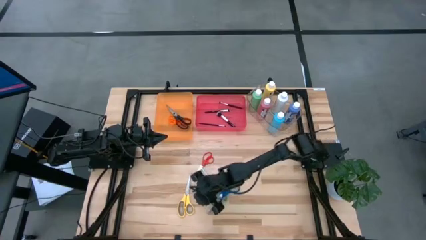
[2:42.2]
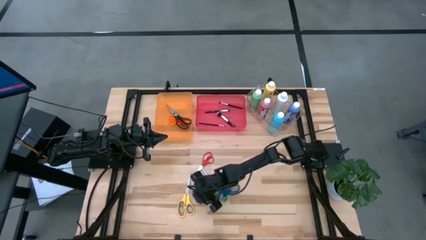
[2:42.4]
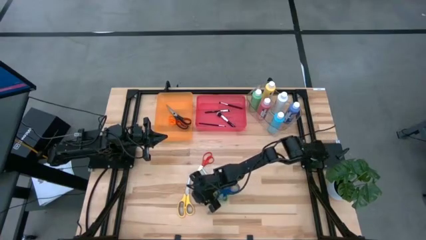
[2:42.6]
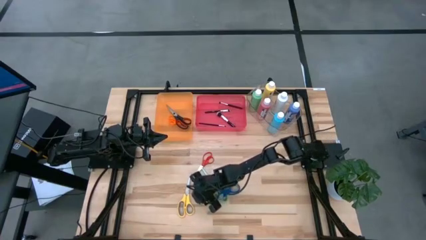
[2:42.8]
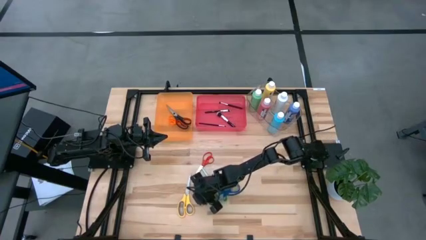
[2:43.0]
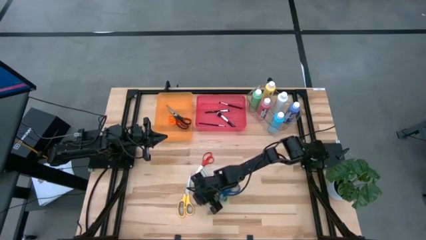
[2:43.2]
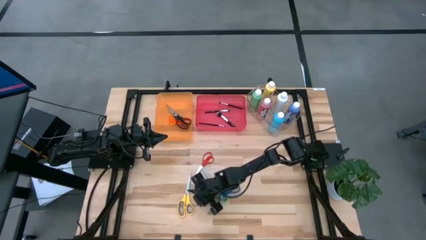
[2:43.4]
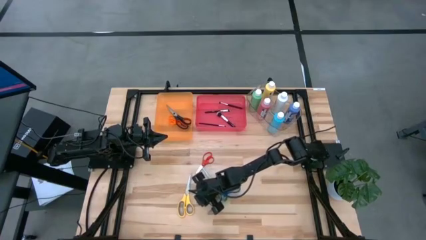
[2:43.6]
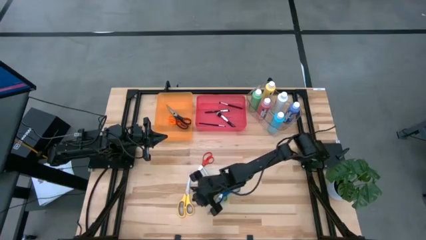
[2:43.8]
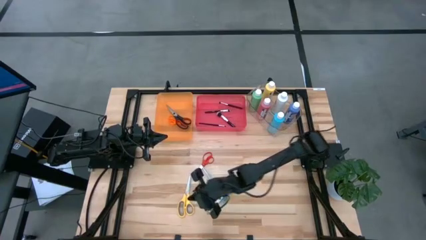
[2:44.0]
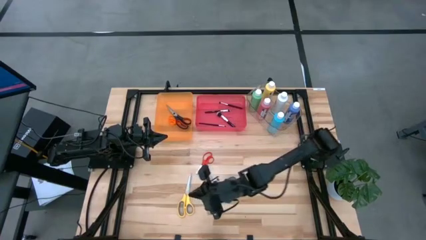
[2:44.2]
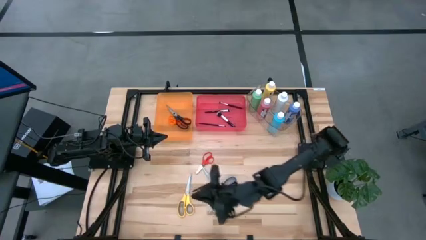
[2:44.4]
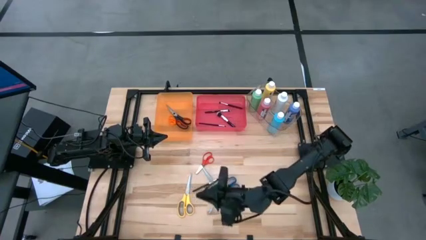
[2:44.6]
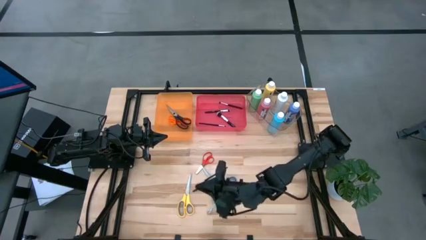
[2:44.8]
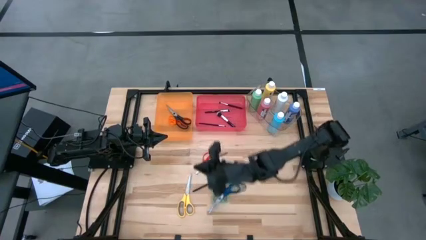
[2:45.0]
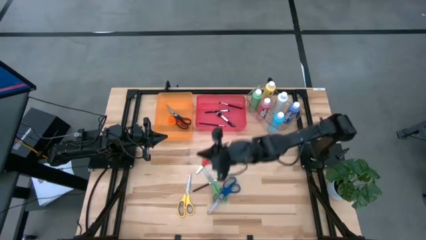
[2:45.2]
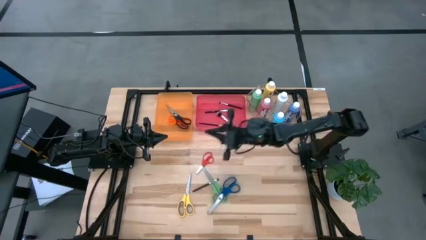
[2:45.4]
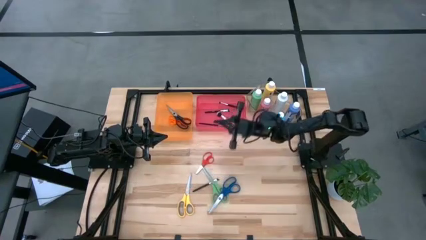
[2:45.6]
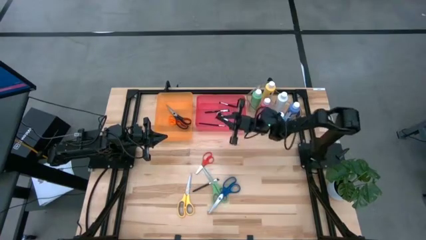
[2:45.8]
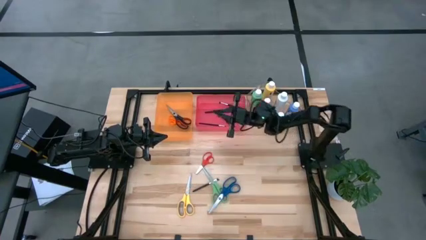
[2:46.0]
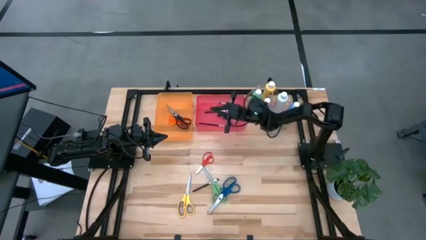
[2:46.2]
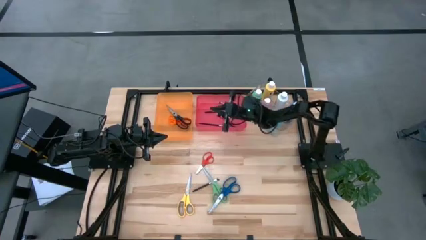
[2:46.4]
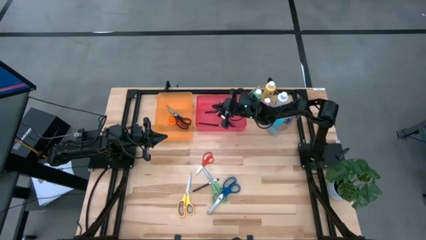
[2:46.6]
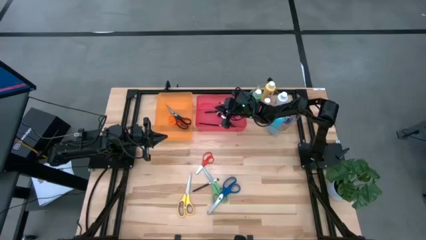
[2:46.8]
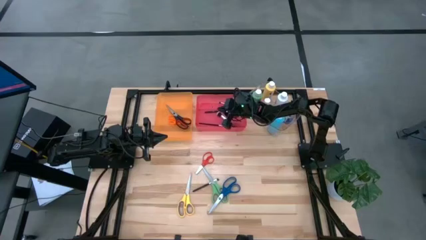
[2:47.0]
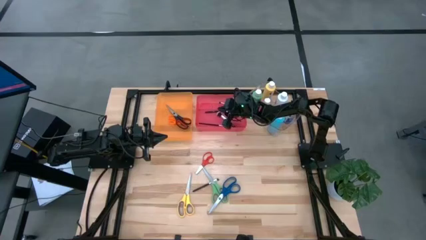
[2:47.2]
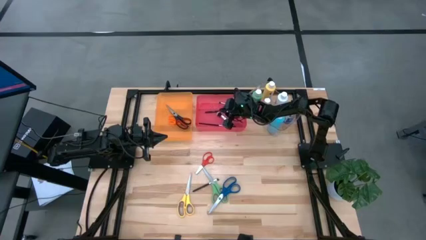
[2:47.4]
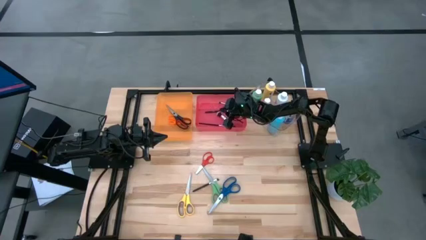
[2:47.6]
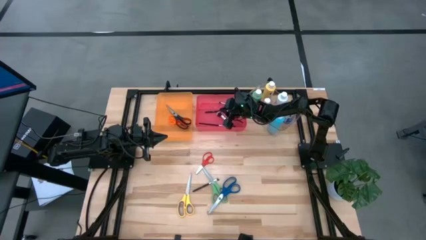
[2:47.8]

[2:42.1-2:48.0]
Task: Pick & Place Paint Supplies
Put the black paintbrush into the pink bin

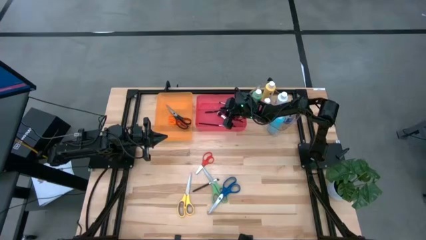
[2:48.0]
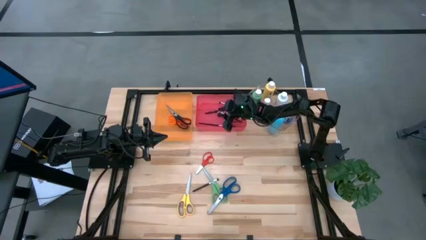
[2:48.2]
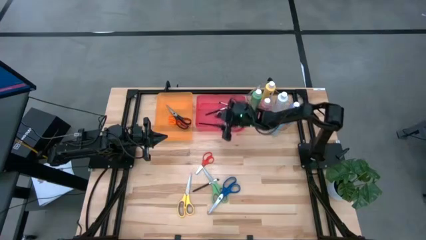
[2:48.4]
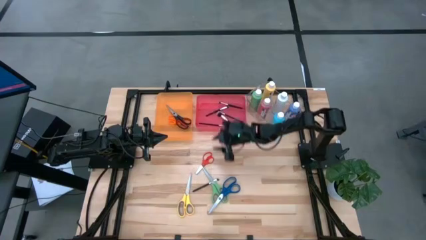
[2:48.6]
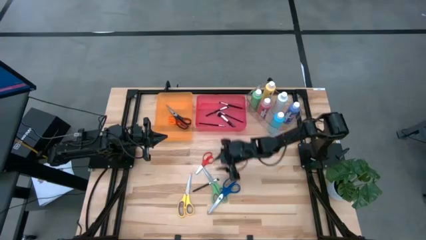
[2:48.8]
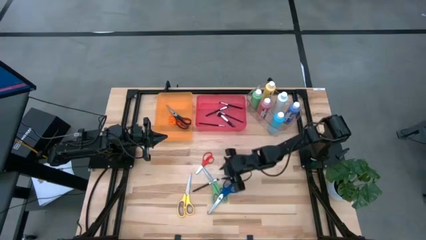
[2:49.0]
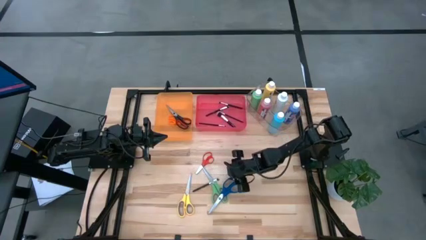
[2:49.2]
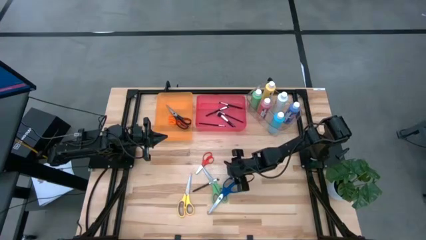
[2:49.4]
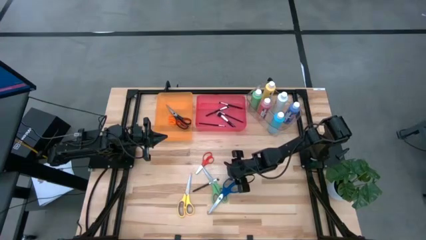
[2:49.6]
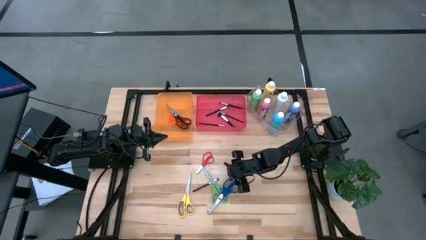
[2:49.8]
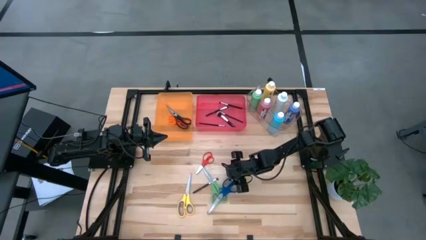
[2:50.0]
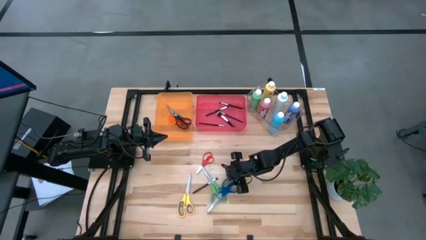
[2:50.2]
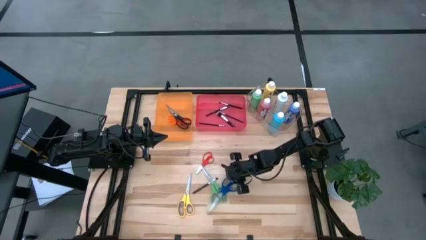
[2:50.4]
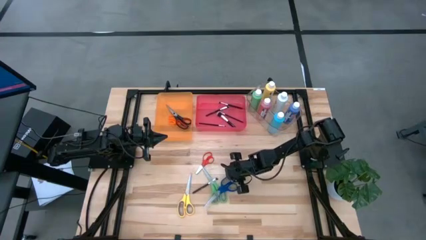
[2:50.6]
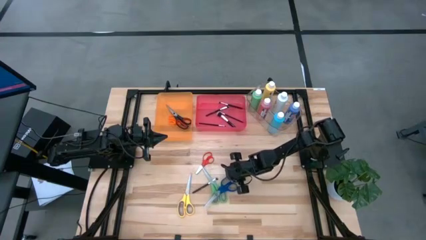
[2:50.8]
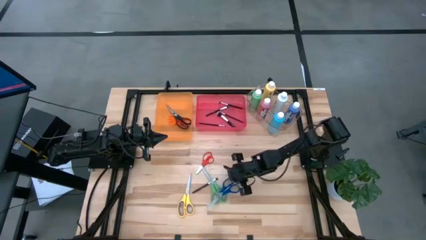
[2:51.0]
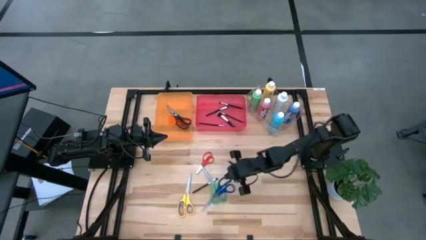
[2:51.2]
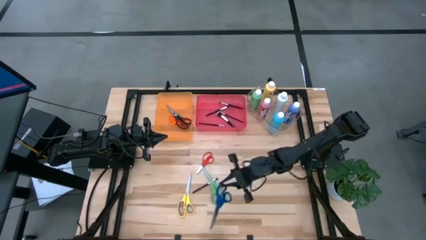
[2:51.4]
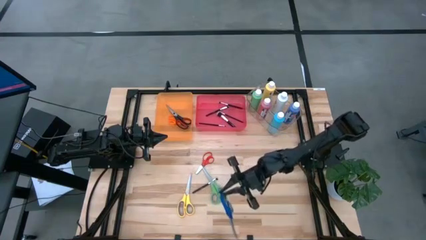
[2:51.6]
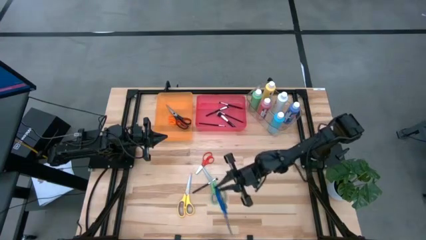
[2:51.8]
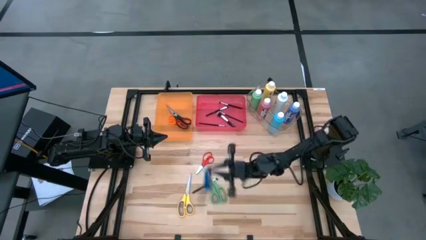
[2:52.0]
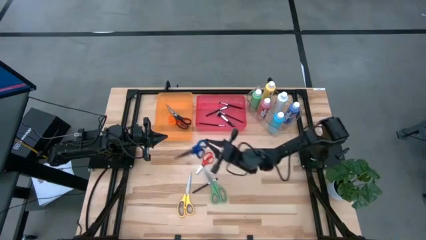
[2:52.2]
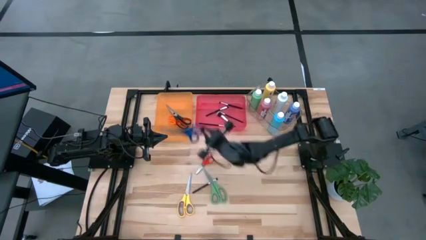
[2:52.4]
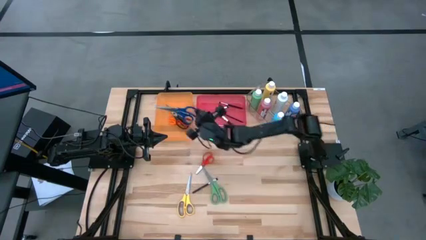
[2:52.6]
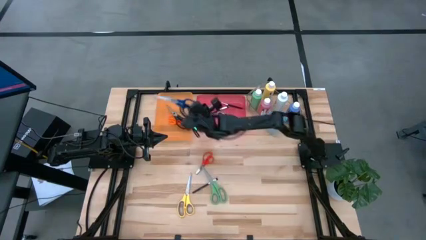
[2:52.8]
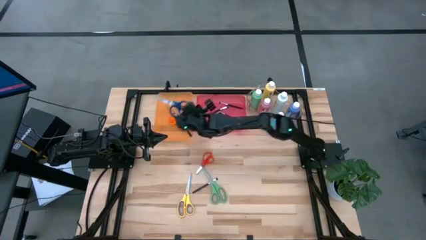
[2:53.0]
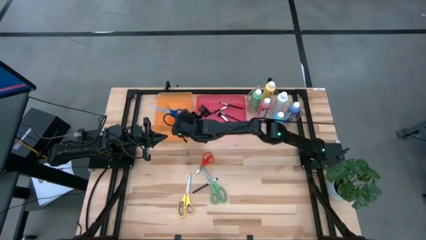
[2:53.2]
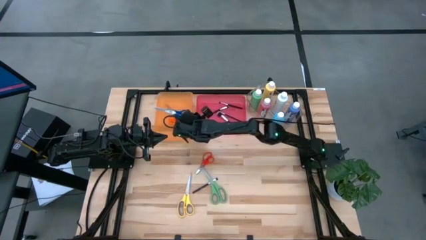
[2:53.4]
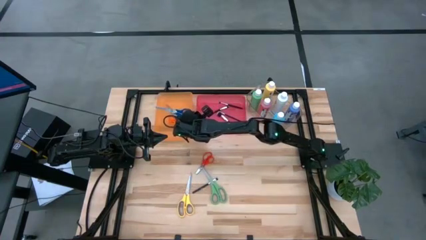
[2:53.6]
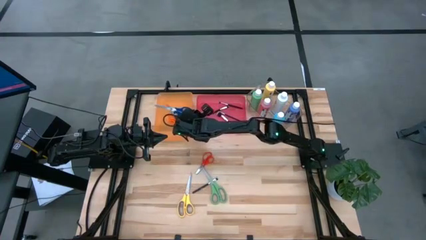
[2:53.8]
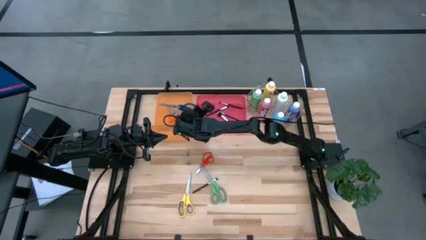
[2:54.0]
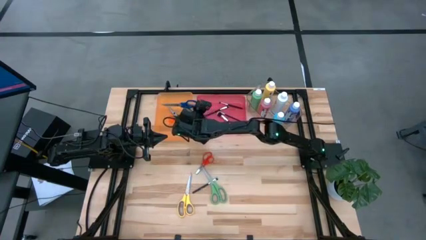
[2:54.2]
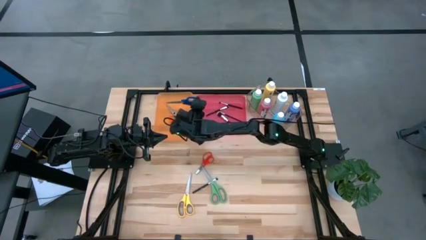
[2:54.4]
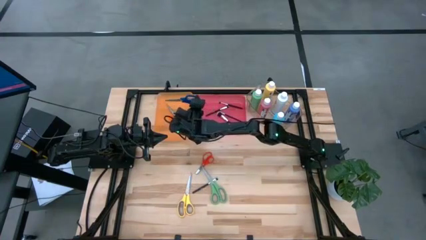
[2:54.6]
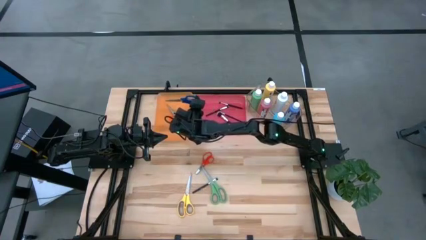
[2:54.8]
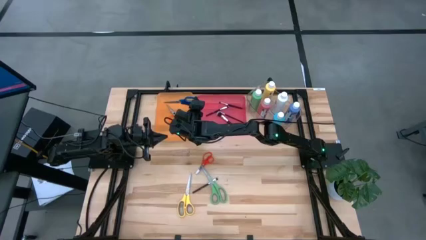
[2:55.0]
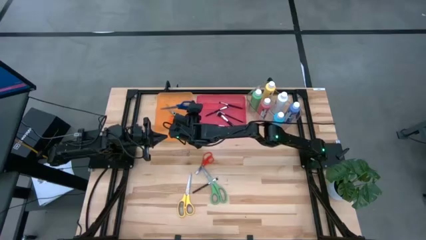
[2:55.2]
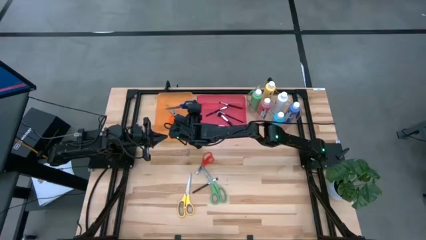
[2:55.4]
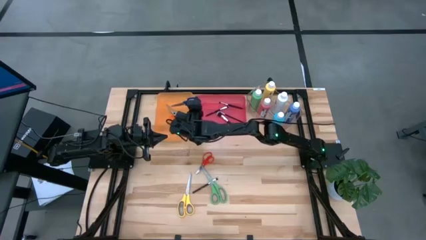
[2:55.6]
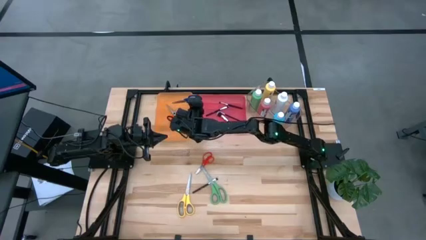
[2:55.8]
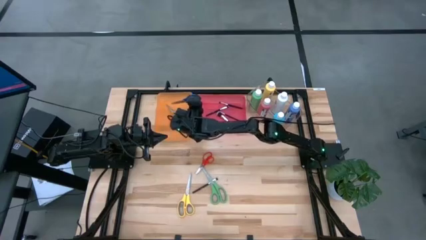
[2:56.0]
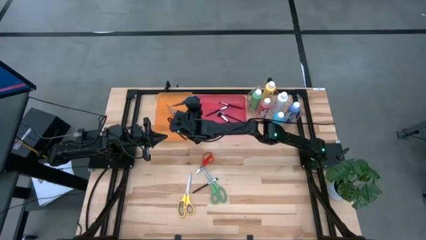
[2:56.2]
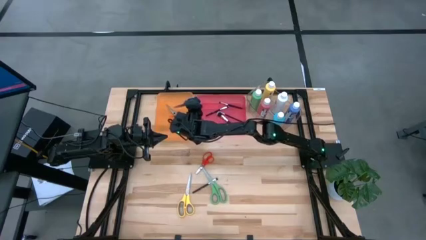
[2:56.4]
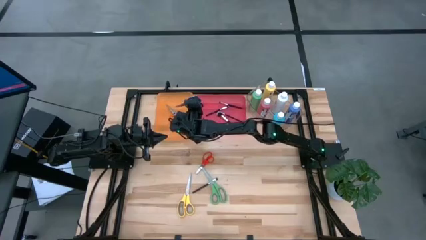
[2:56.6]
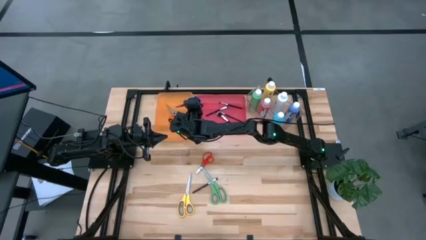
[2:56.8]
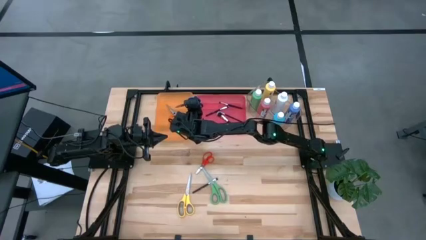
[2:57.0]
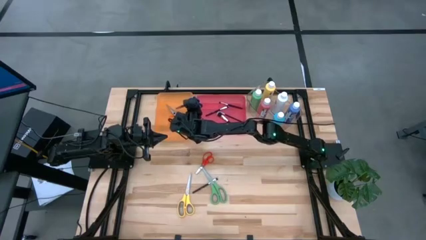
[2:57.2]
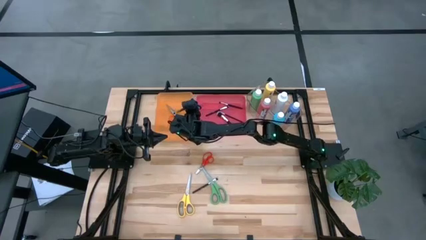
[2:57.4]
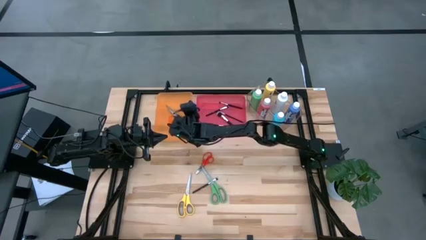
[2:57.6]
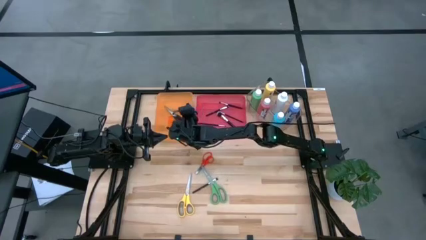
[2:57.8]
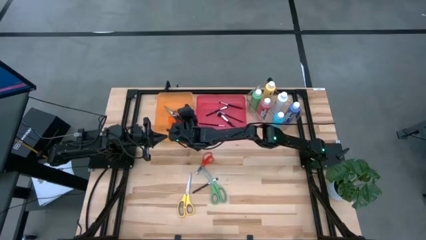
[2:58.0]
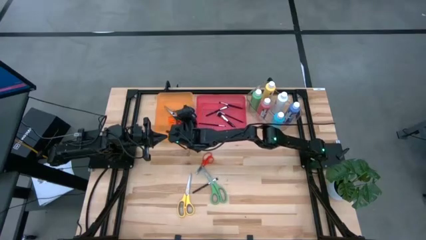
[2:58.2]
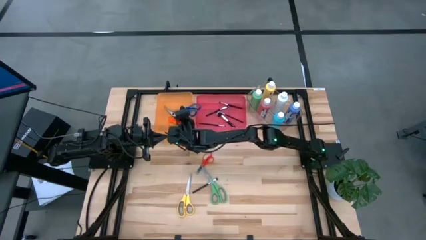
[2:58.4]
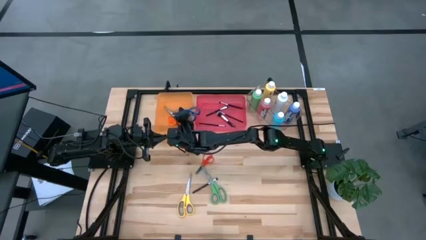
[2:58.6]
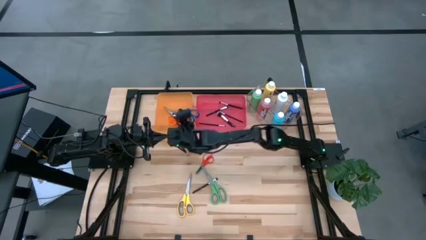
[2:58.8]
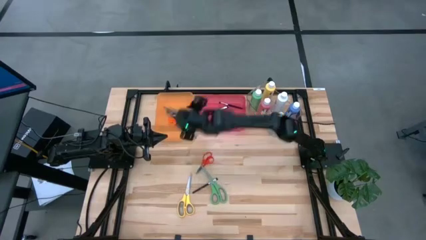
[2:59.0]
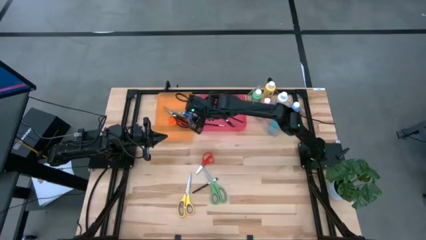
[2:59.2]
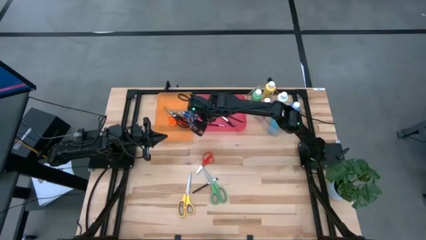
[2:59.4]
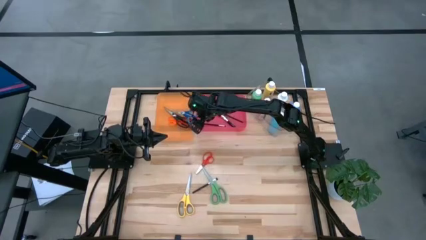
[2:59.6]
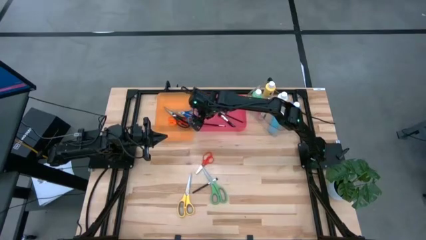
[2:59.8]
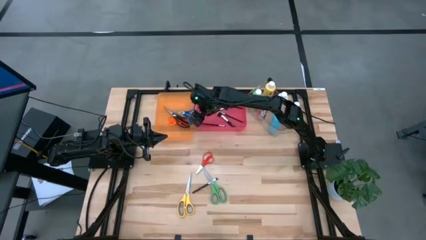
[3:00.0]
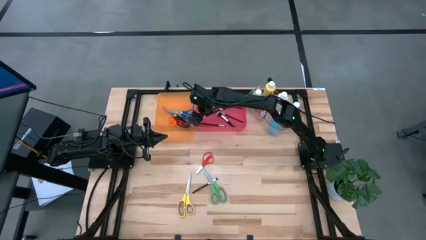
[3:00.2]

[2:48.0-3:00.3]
Put the blue scissors into the orange bin
